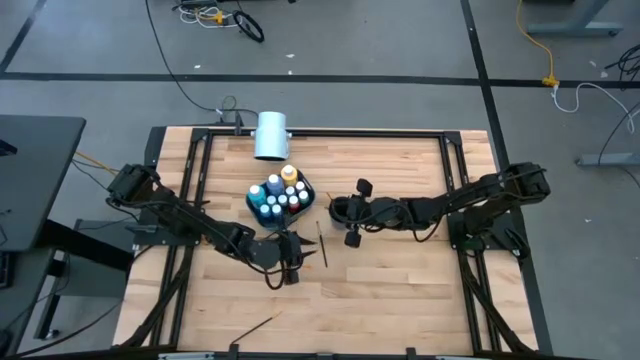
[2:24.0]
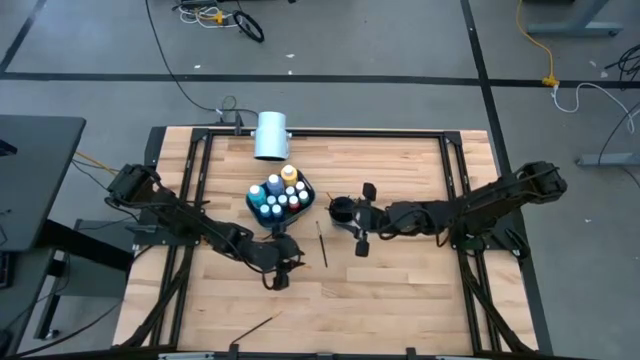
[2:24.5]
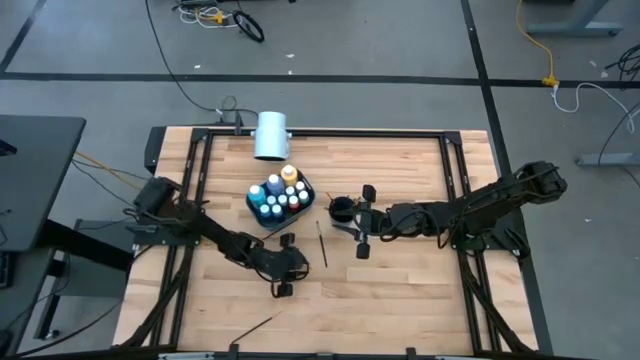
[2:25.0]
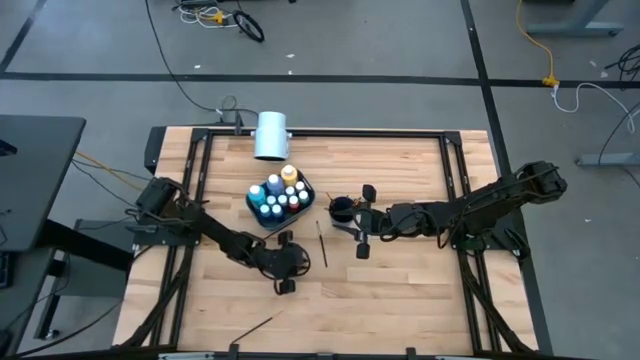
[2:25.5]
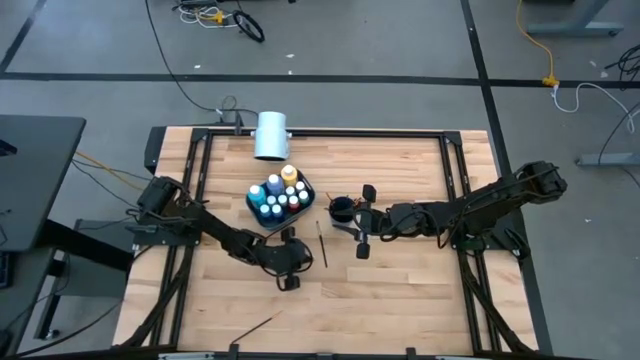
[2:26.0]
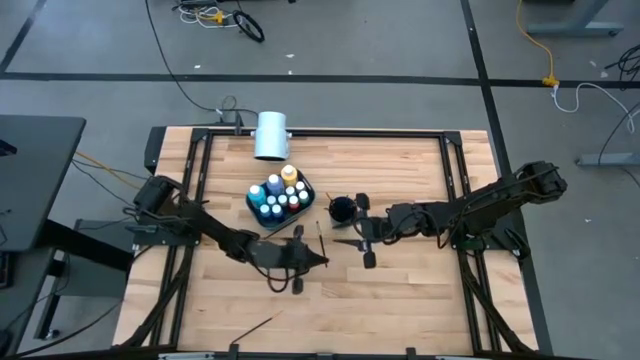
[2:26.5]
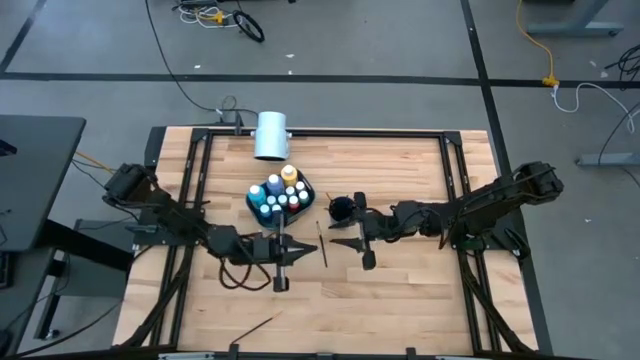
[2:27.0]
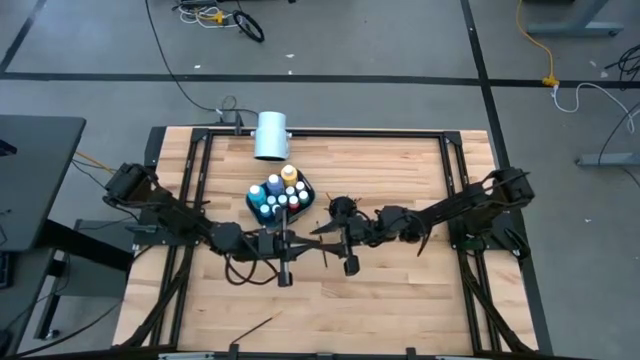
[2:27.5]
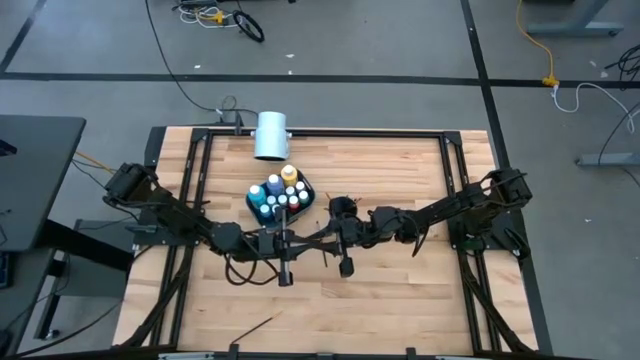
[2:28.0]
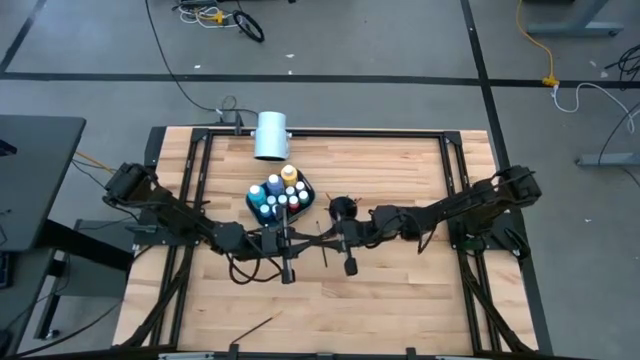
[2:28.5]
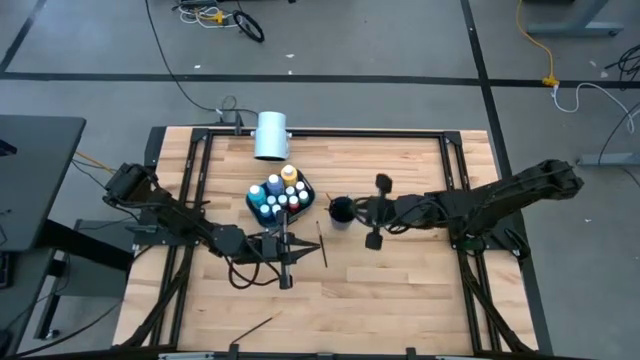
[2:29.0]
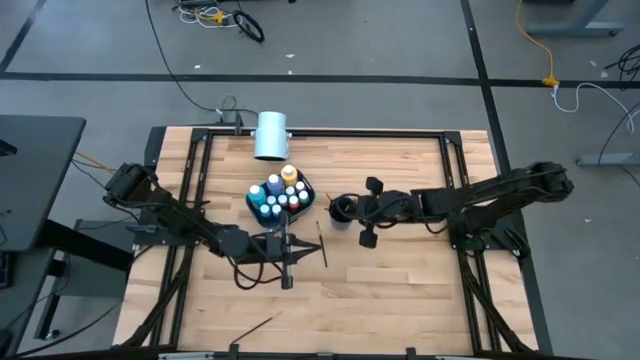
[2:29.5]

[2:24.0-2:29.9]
Task: Pick & Place Paint Supplies
Put the gold paint brush into the blue cup

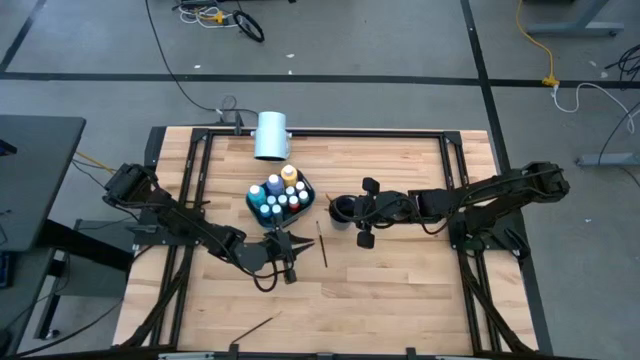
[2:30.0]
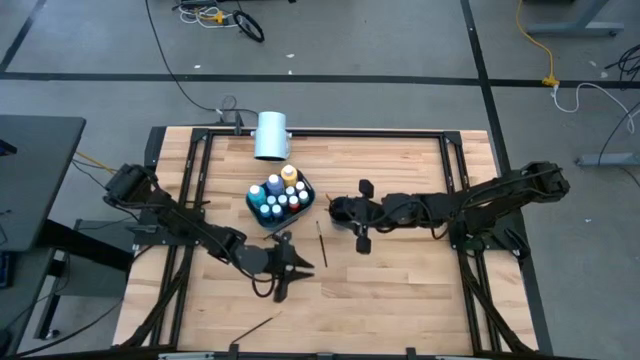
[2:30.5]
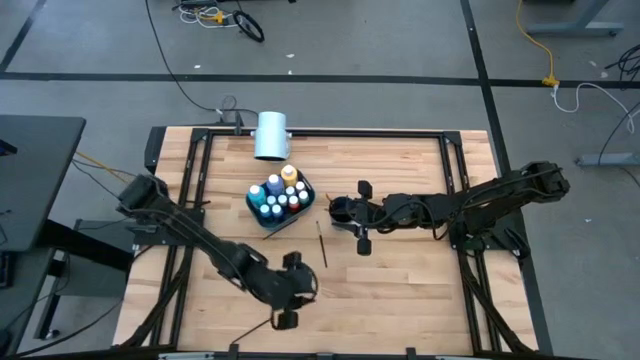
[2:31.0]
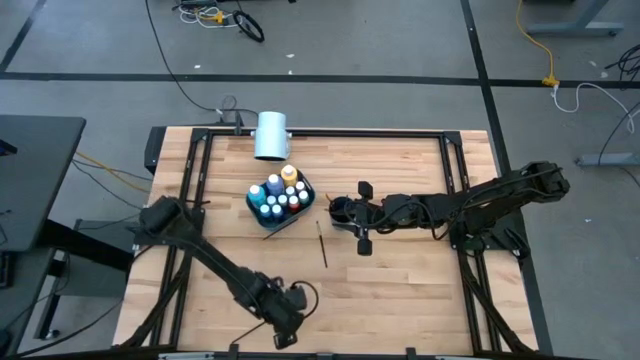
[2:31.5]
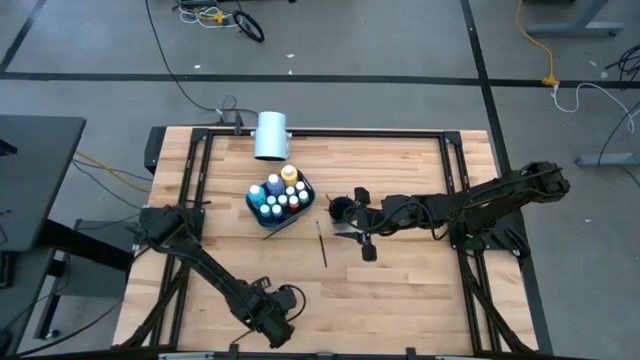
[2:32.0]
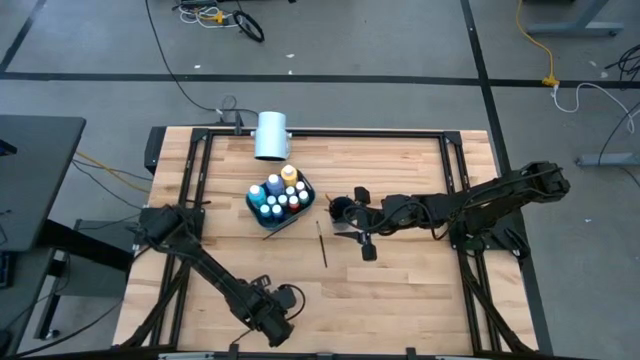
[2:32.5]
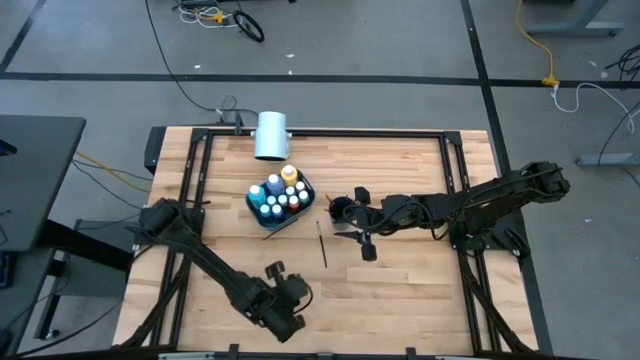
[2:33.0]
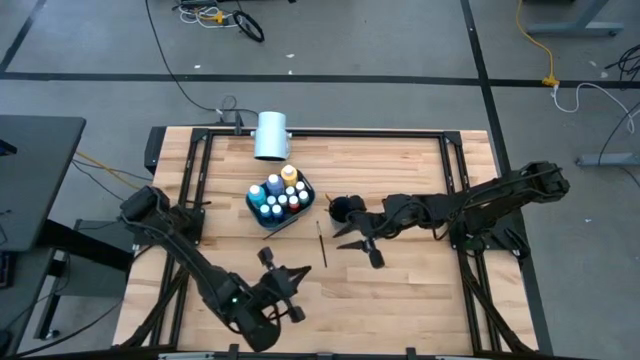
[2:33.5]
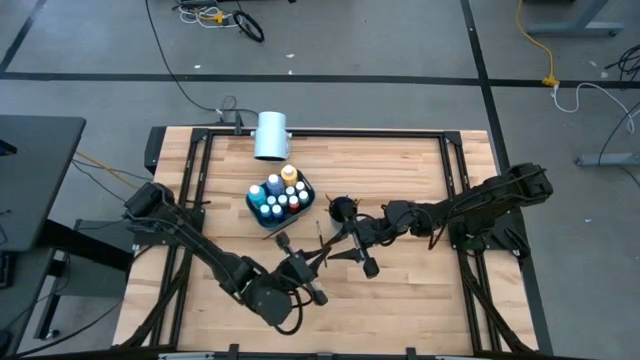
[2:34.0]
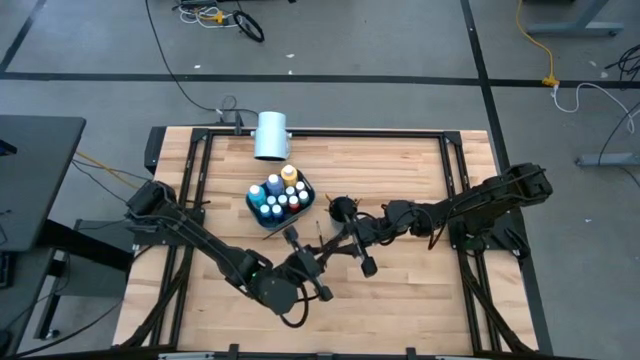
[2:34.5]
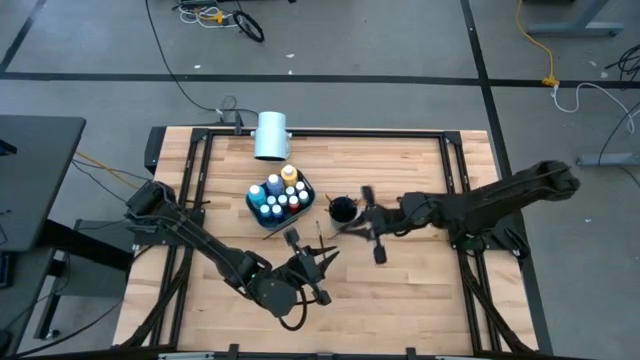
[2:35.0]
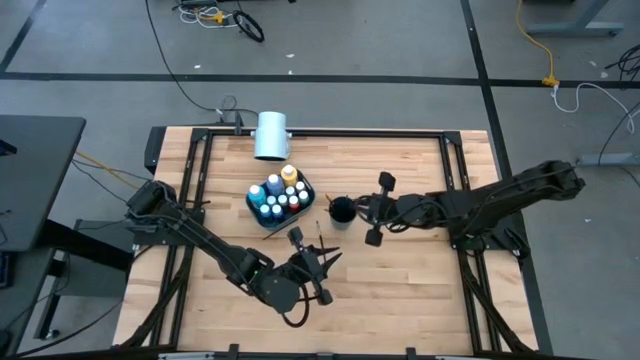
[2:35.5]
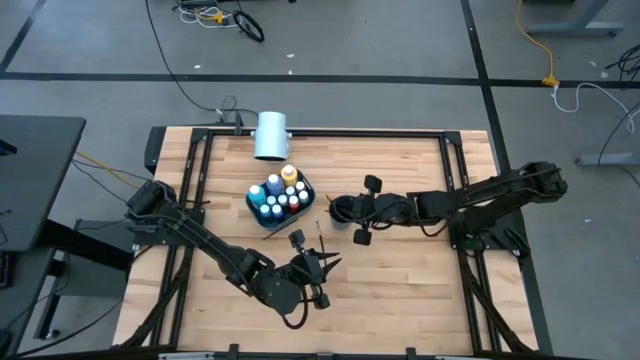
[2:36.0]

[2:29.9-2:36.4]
Put the gold paint brush into the blue cup

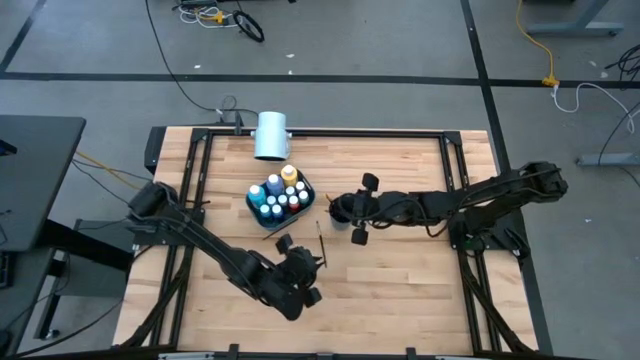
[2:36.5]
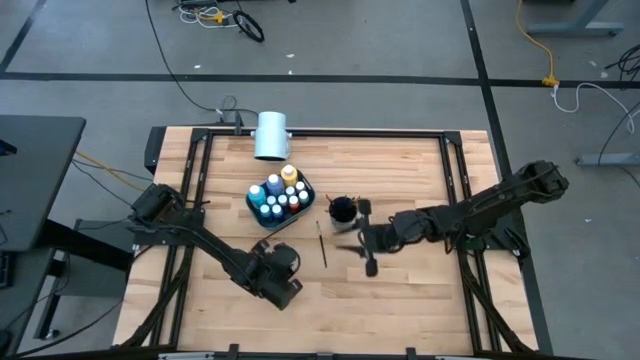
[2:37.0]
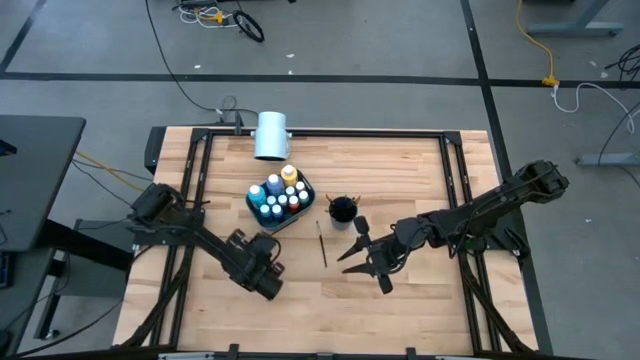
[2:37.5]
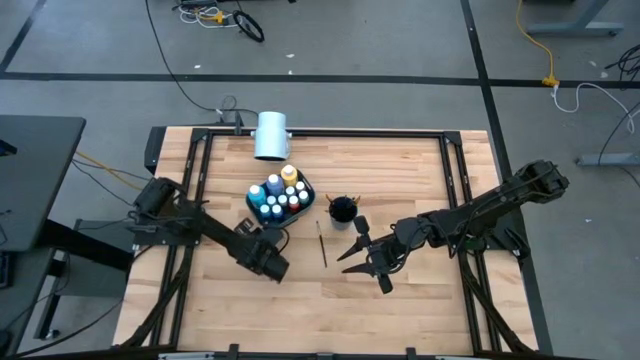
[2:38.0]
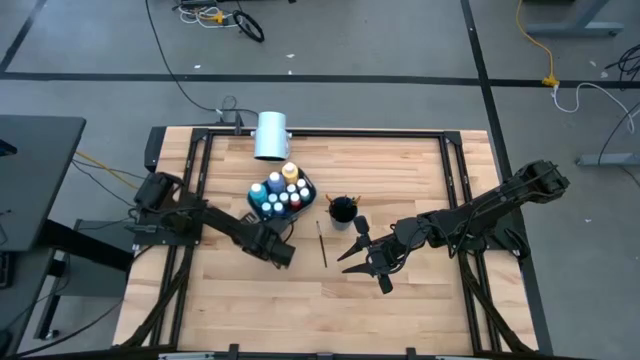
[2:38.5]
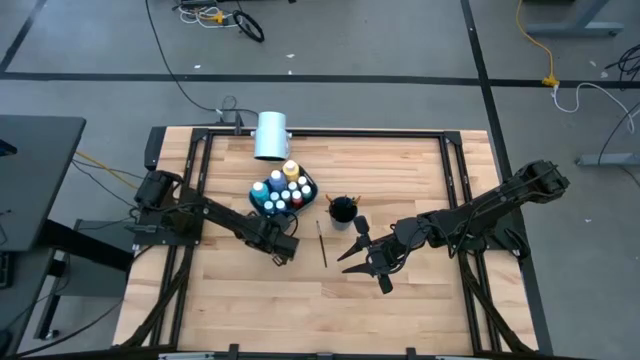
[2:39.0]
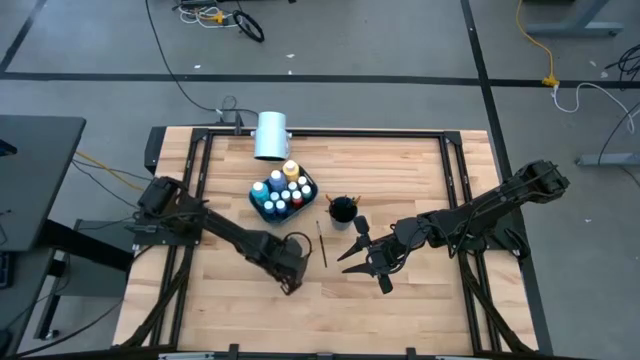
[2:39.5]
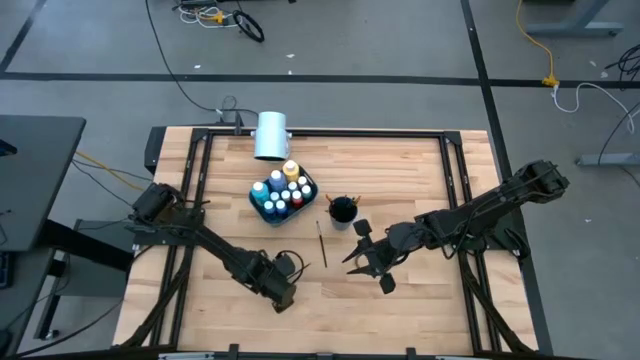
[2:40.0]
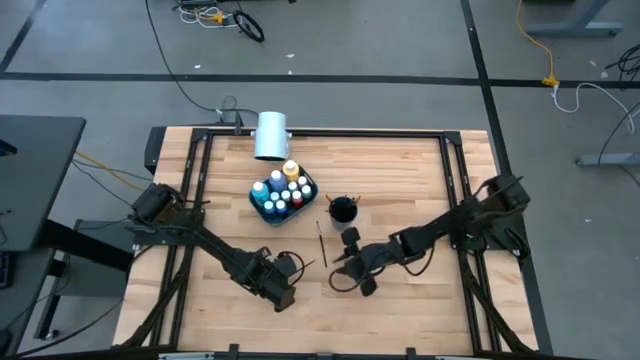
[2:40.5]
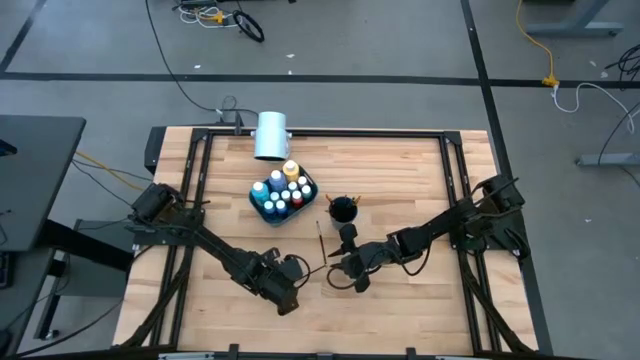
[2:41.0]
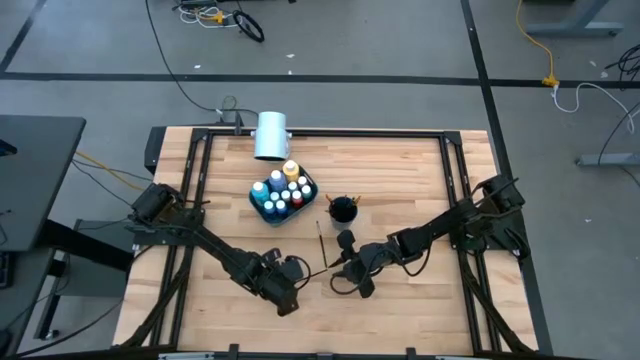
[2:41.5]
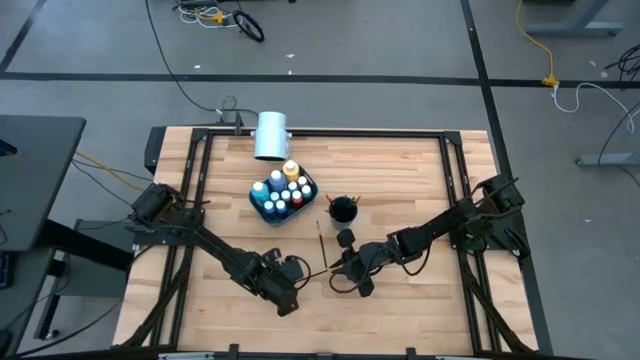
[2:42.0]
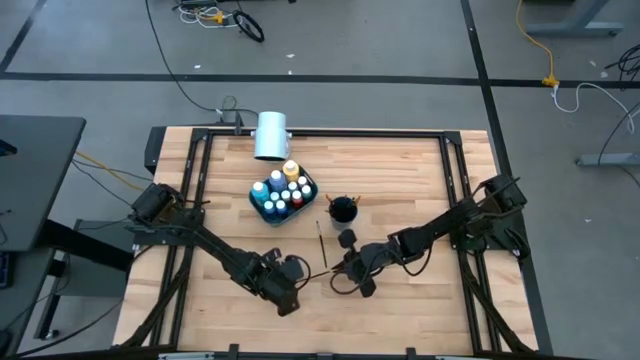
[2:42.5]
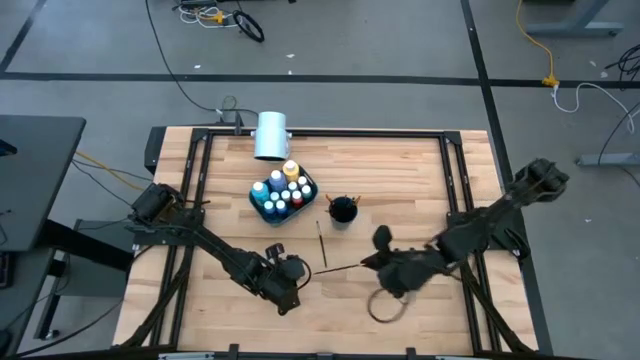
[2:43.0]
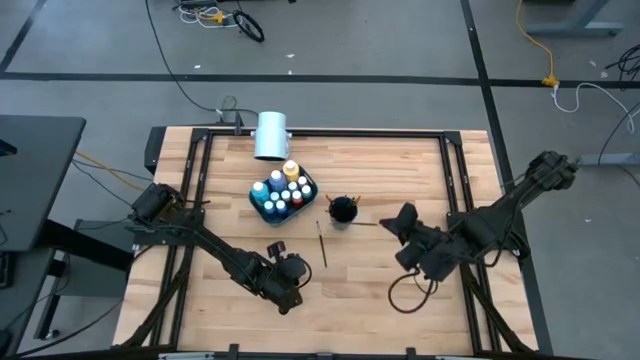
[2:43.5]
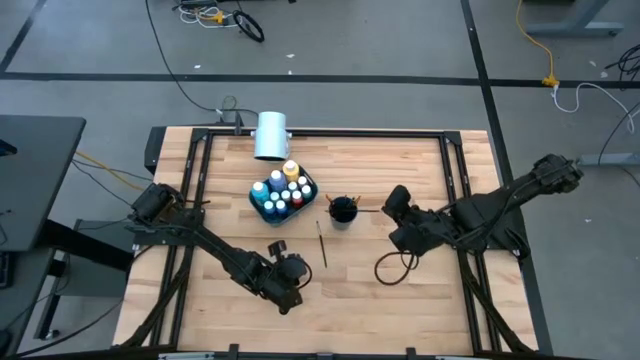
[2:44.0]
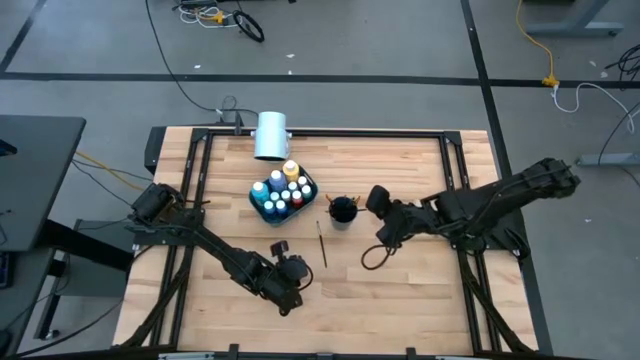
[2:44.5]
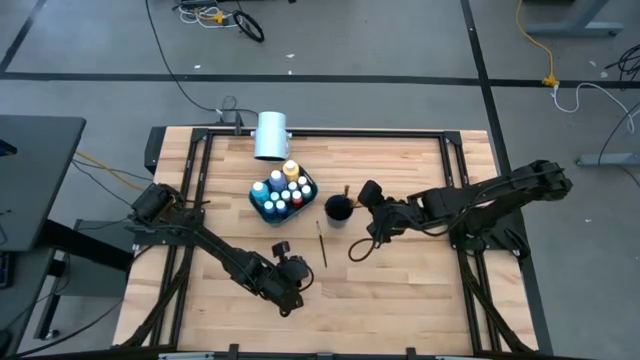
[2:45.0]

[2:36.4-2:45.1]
Put the gold paint brush into the blue cup
